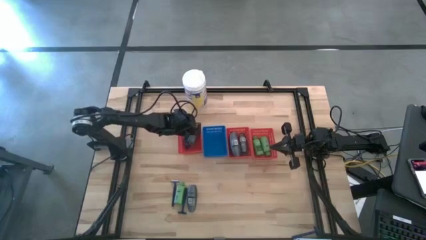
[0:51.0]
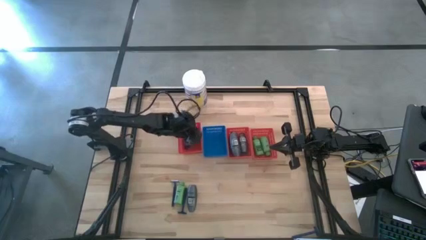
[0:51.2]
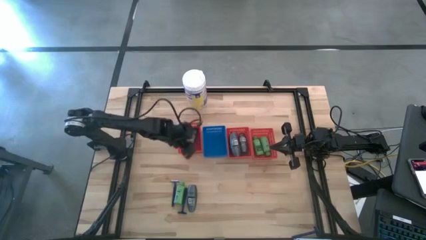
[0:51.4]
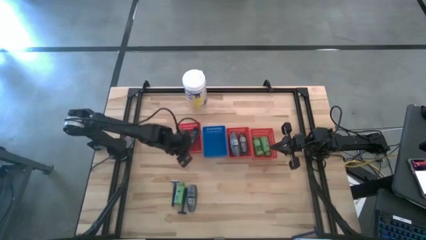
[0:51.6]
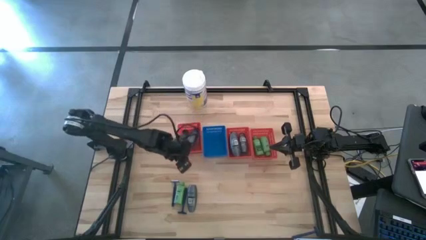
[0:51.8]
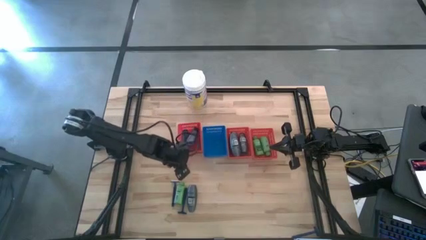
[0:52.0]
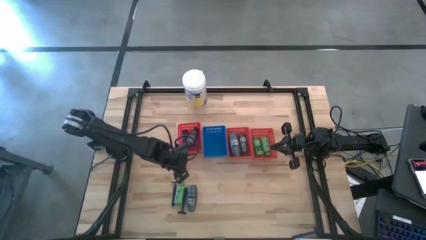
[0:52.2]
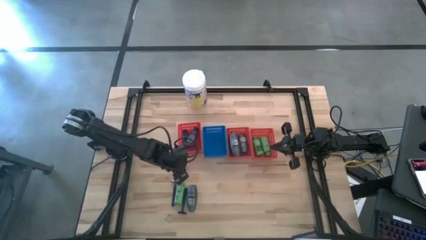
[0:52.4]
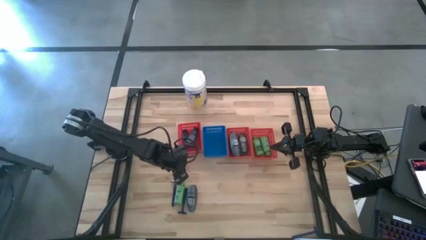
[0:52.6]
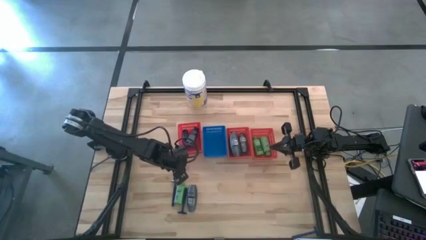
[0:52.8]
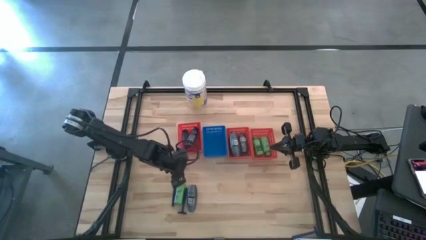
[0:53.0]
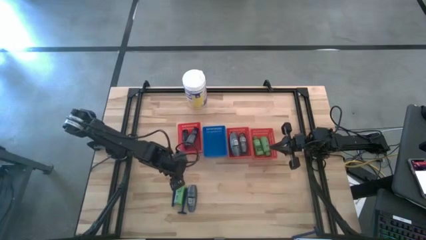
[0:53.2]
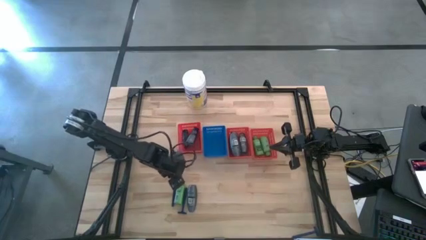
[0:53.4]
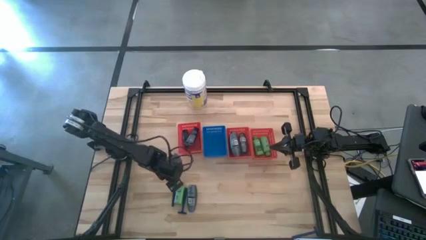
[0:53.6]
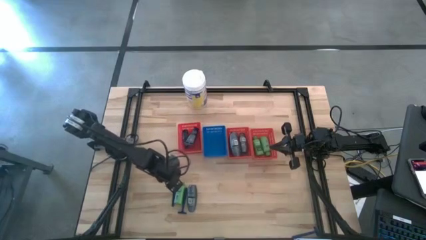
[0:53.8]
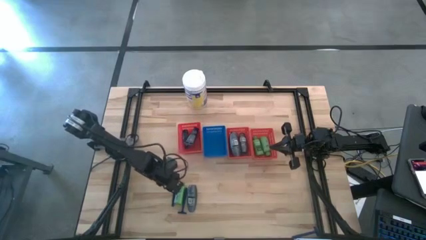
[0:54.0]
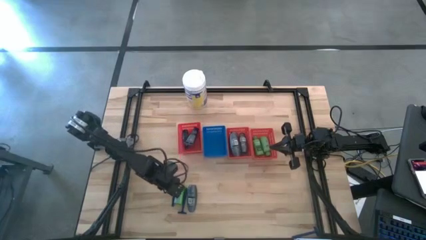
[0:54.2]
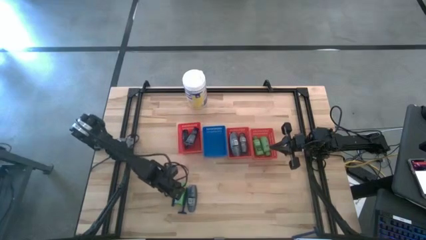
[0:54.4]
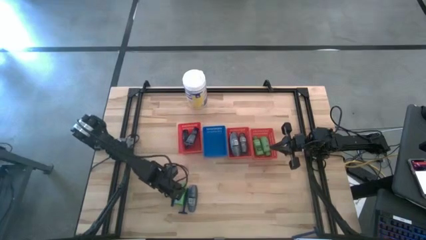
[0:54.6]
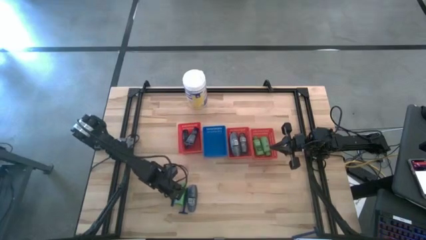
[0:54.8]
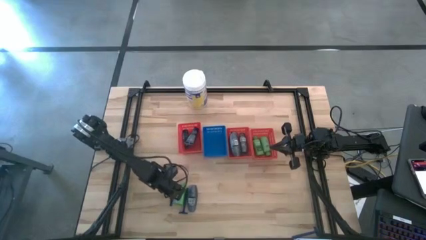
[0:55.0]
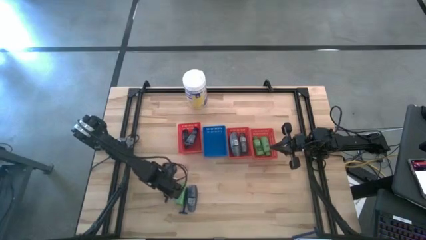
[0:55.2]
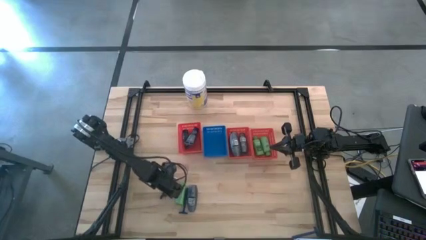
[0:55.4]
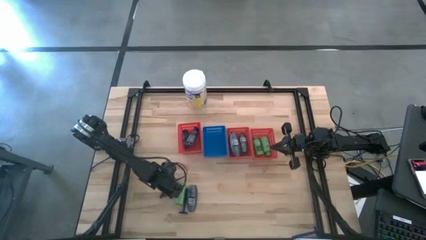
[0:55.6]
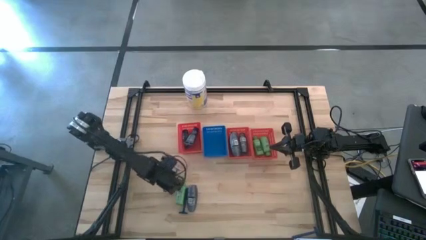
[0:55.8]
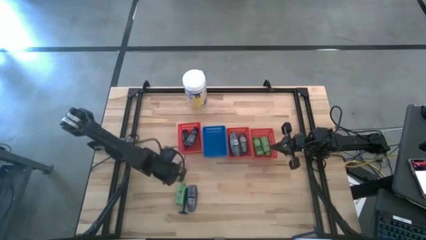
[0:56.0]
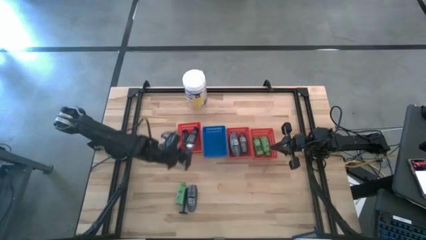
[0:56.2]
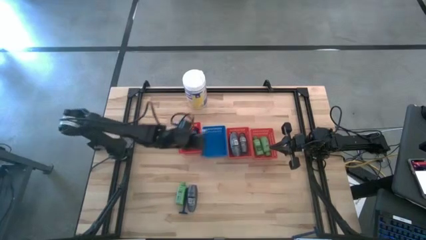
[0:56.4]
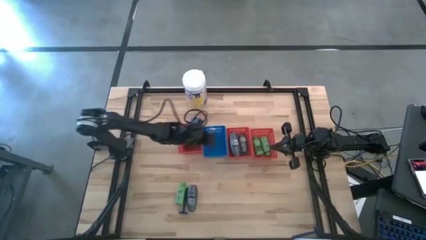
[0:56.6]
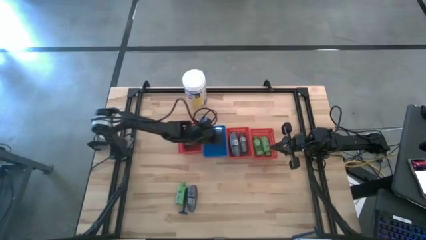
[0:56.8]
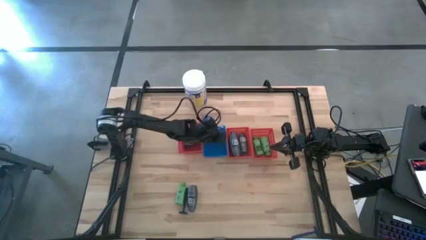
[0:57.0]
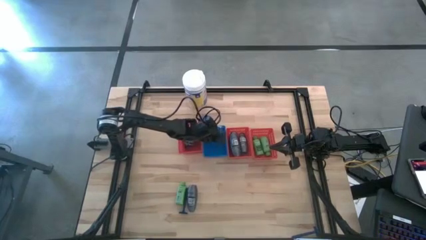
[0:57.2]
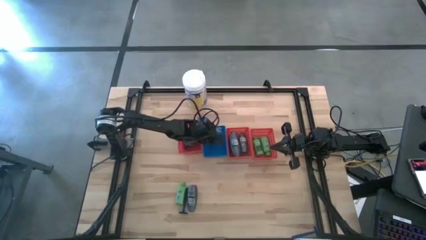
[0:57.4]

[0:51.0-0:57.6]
Task: Pick & Place Travel size toiletries
Put the left blue razor into the blue bin

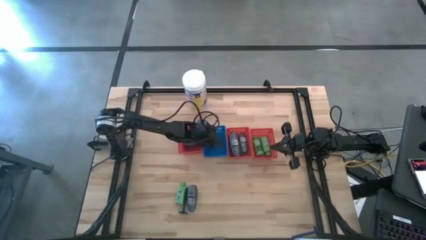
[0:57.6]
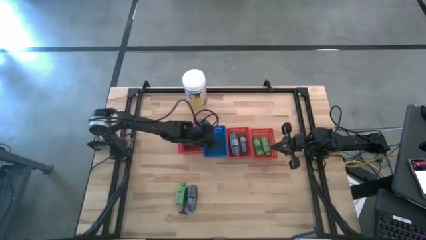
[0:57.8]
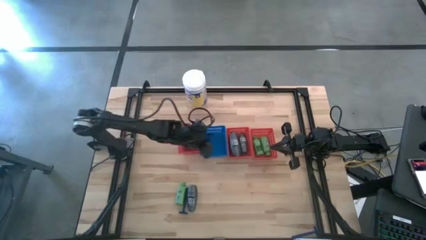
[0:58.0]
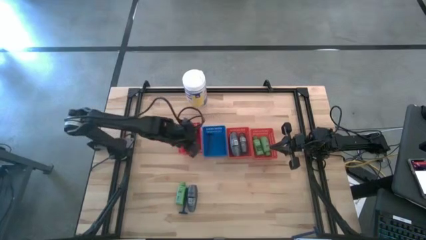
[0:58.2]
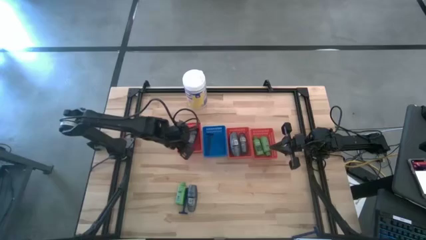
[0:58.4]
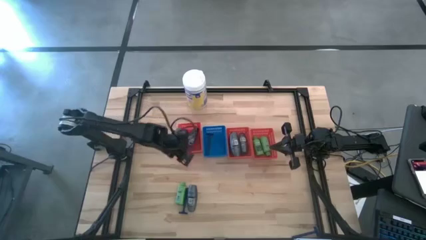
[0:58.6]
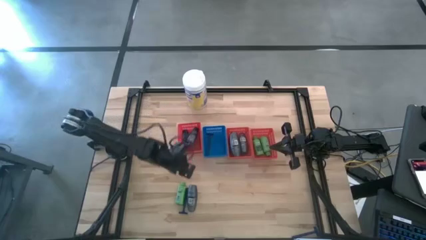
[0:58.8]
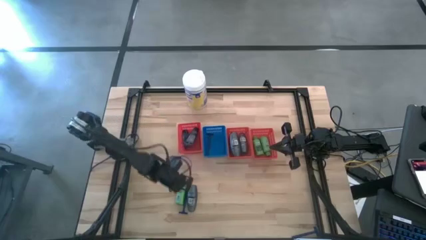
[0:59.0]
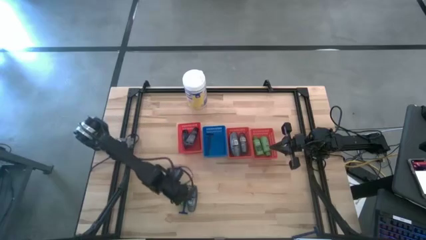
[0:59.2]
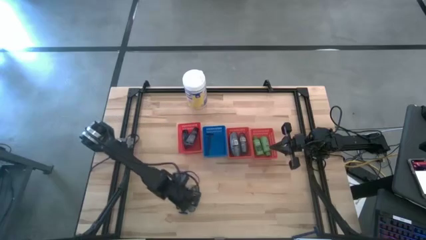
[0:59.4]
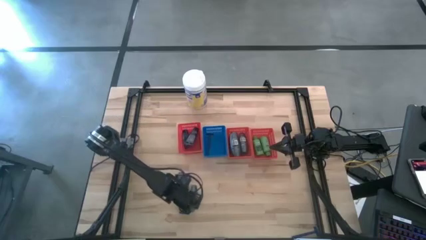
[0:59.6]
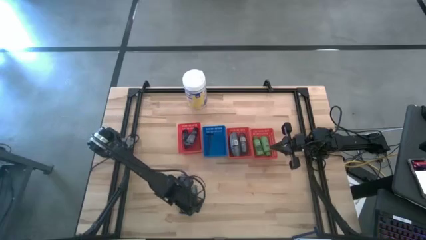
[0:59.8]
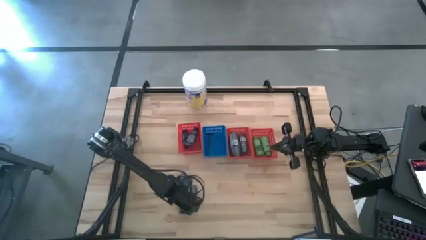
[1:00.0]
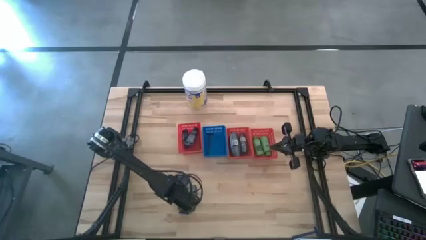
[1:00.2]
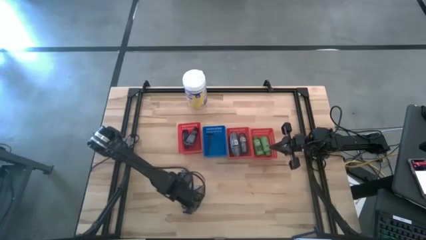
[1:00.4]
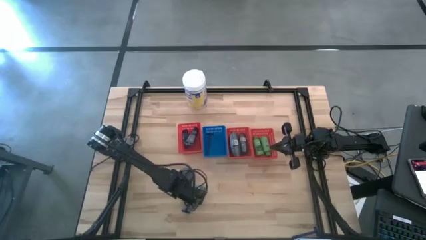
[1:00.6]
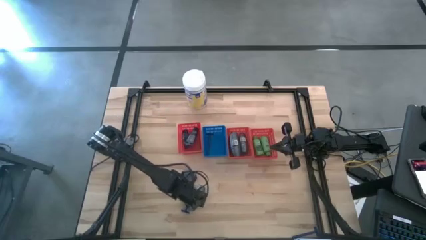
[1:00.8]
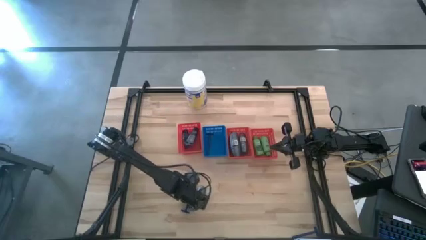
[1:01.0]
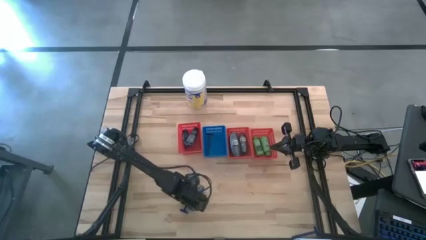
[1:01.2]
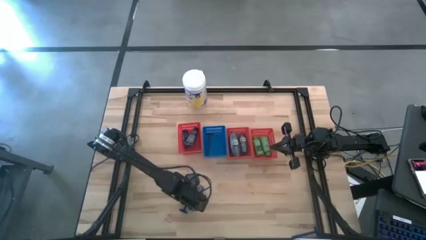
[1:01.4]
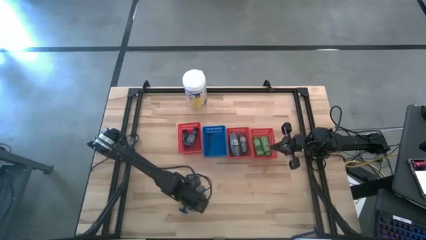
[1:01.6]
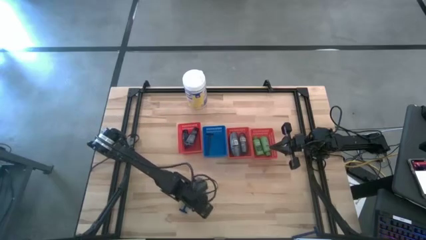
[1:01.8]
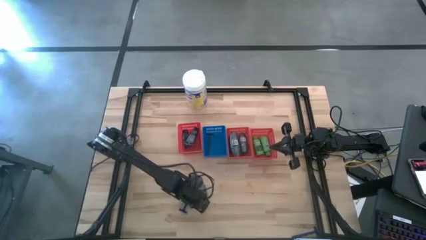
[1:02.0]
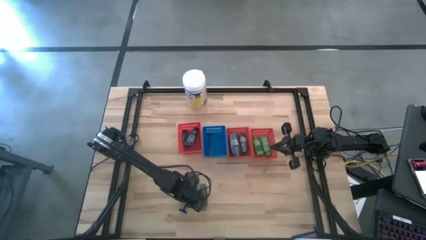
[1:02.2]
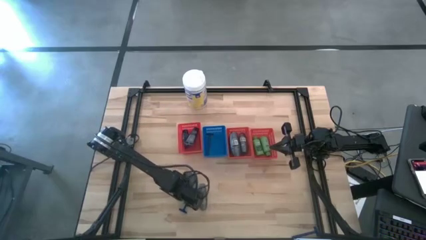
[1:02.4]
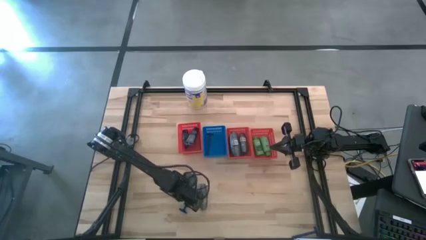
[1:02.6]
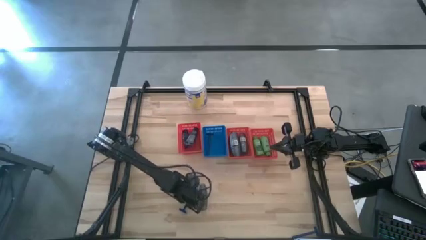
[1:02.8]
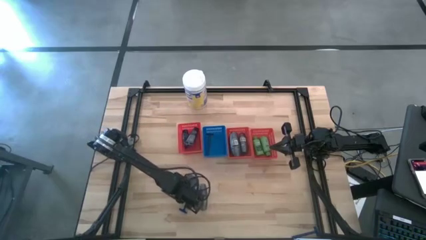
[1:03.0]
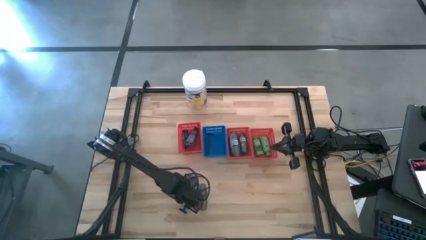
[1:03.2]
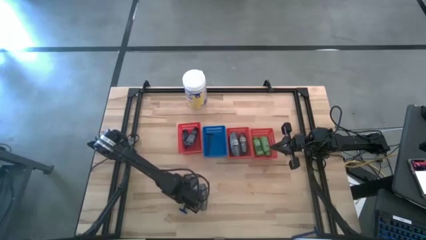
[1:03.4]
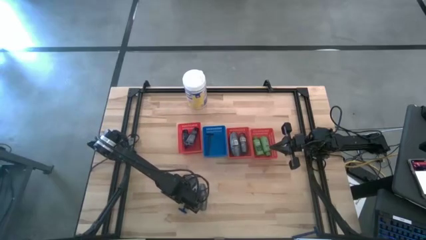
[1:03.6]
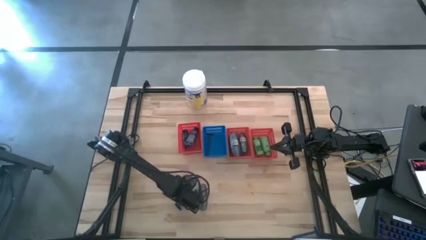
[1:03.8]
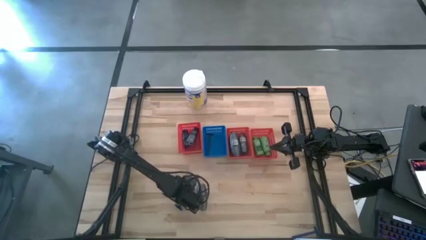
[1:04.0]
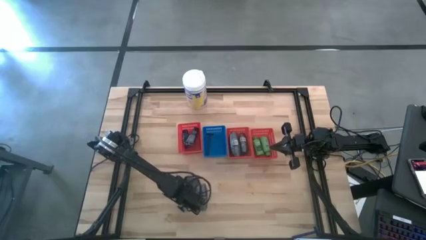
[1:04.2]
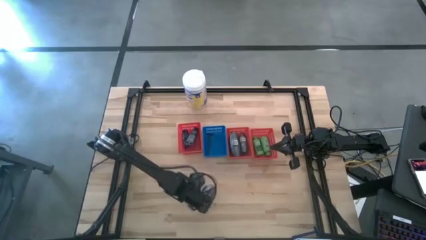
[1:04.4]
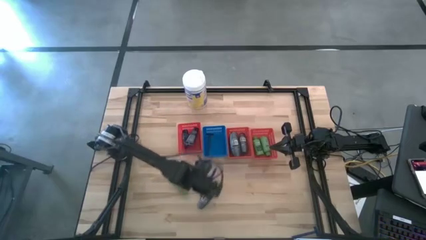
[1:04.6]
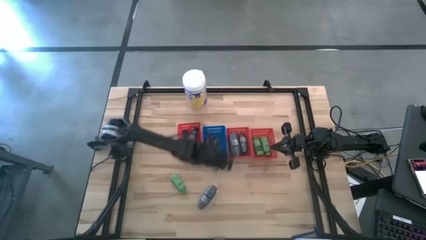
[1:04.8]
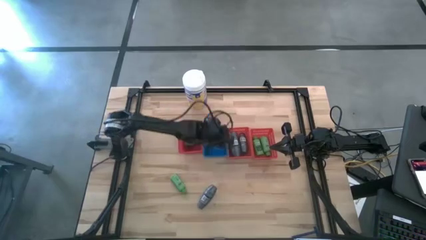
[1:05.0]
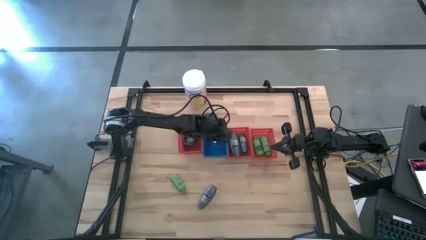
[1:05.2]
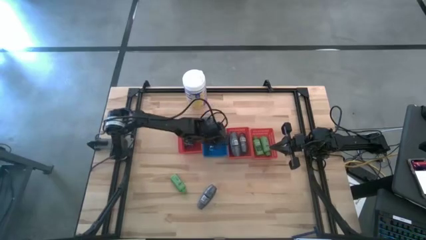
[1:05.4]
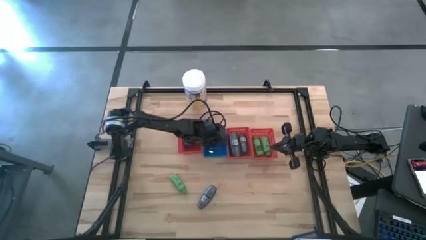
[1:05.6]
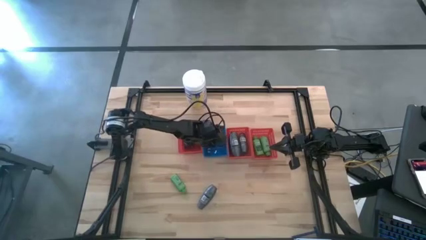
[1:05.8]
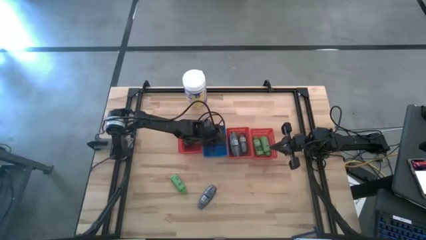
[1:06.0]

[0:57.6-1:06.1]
Put the blue razor into the blue bin
